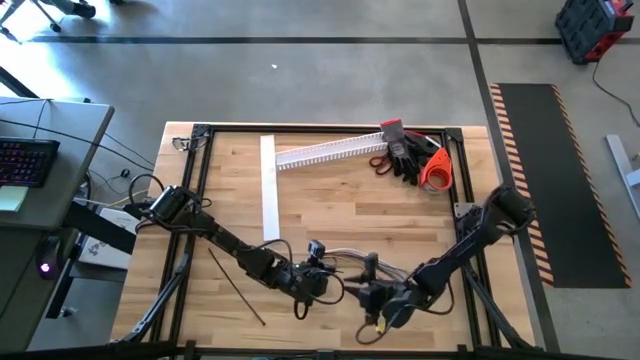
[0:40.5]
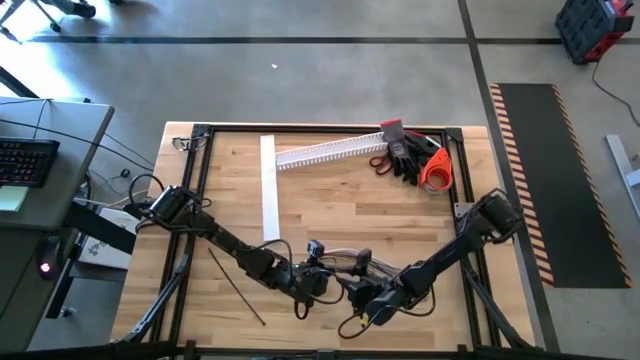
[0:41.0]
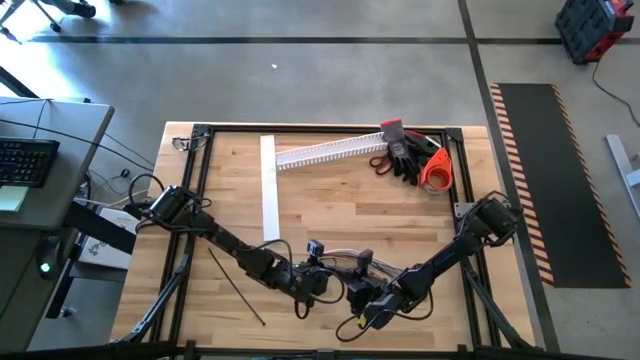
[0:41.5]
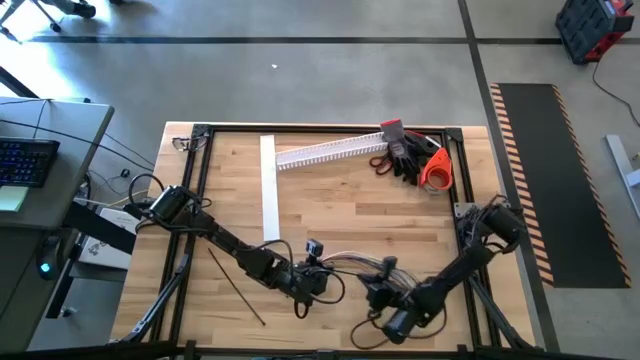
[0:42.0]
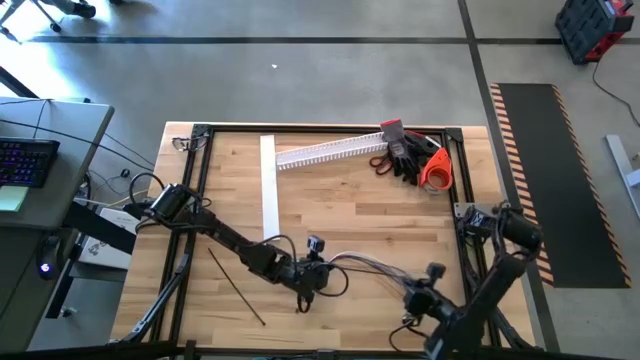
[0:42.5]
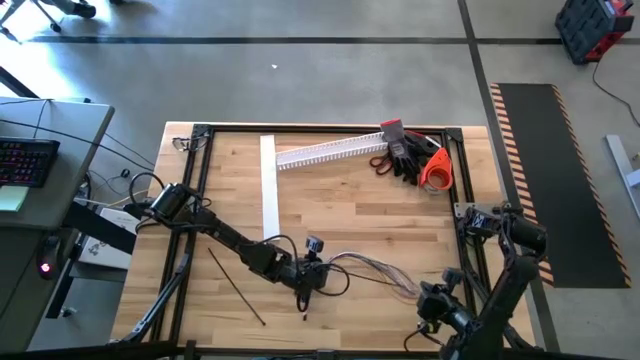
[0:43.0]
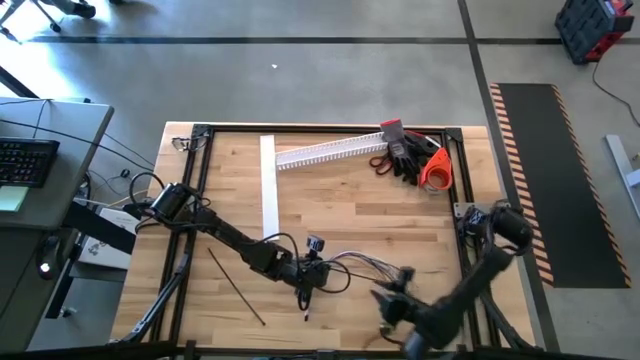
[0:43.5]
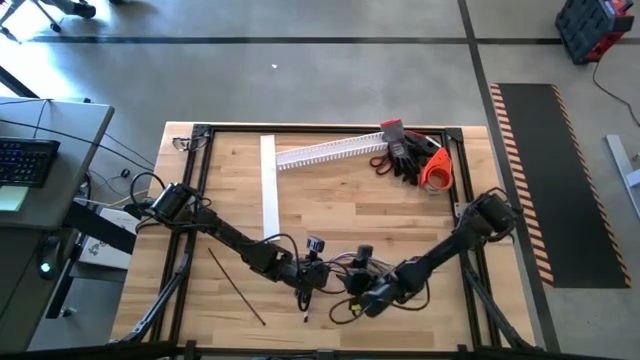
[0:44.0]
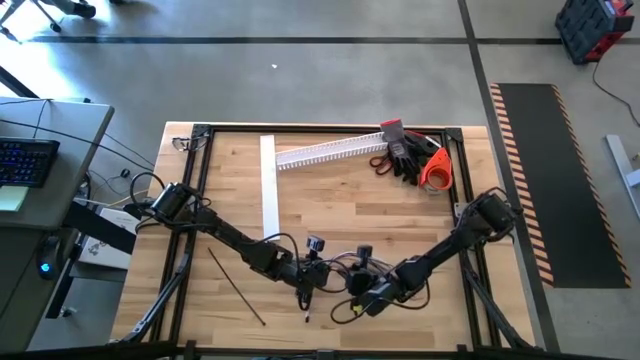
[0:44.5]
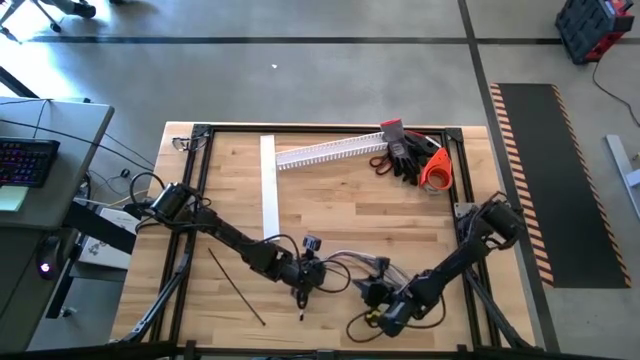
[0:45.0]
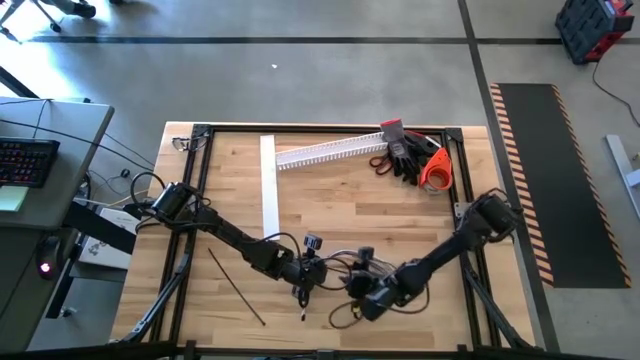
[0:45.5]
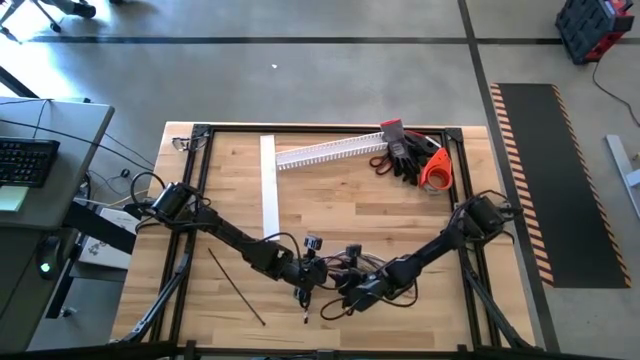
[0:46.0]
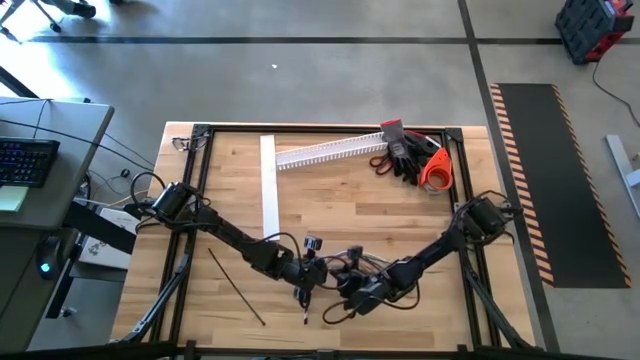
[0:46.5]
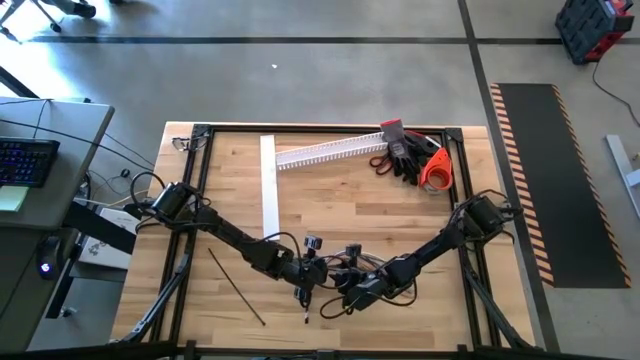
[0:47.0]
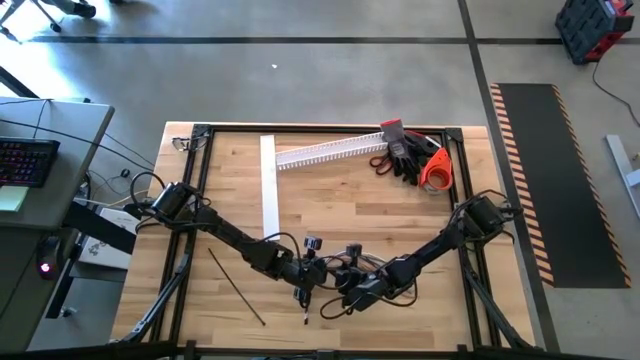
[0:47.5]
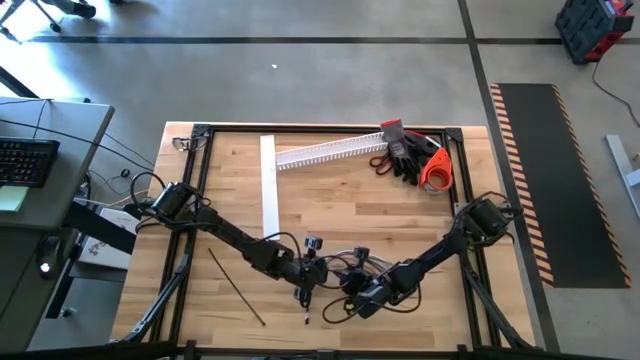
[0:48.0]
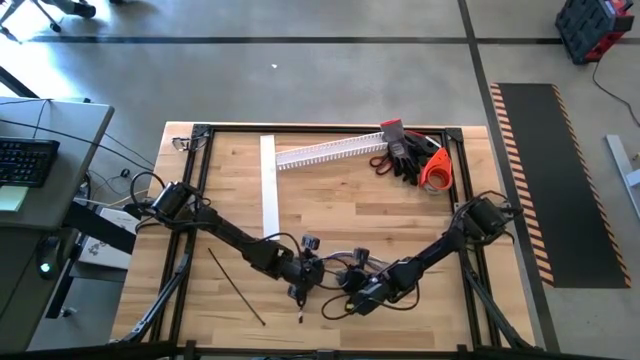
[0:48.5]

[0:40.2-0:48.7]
Task: Ziptie cables
Wrap the cable wires with the black zip tie

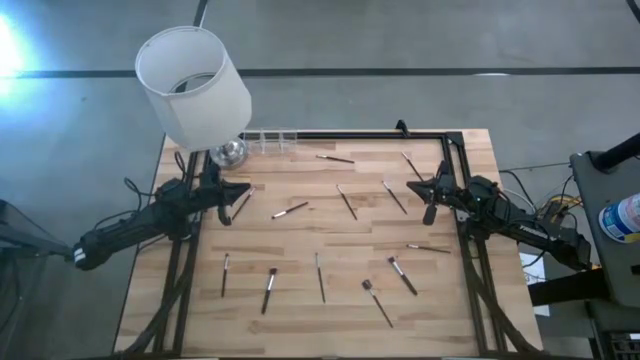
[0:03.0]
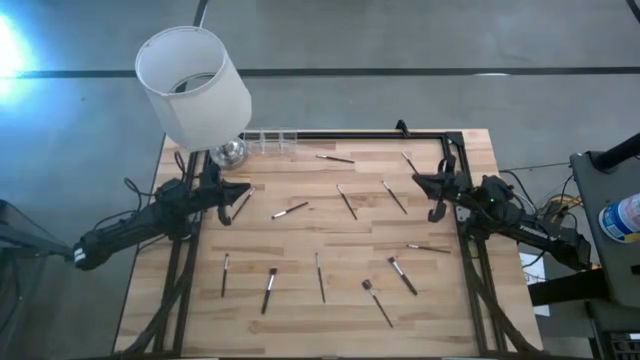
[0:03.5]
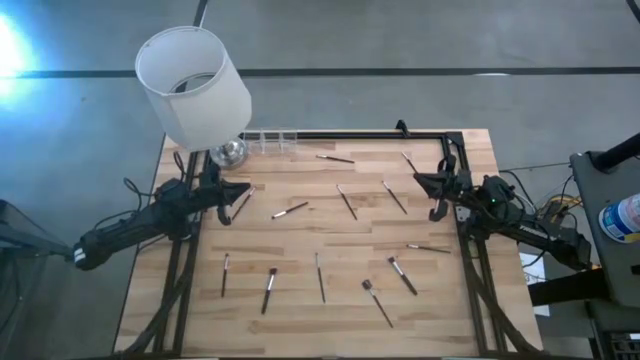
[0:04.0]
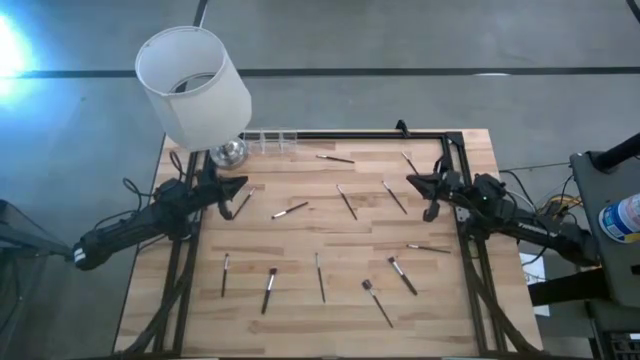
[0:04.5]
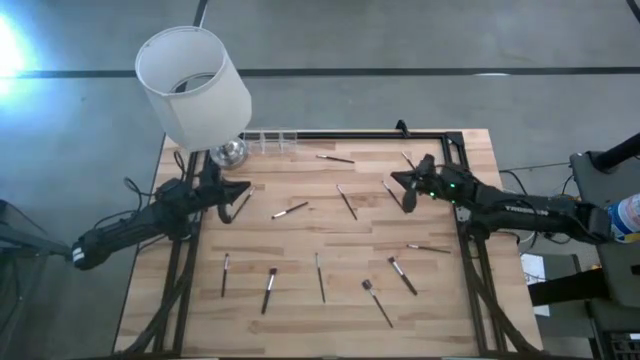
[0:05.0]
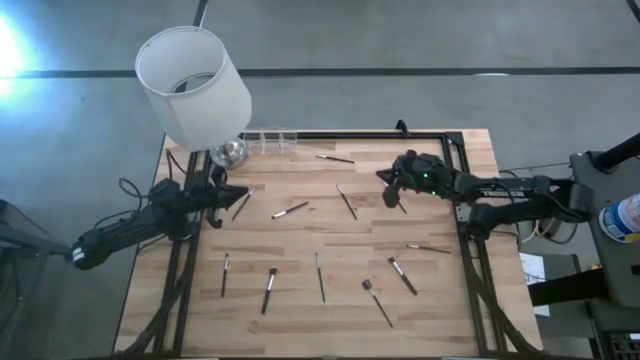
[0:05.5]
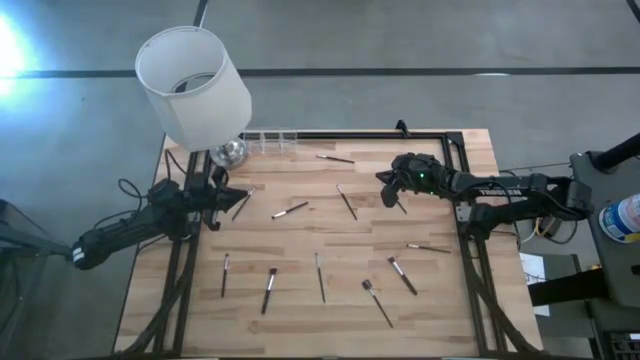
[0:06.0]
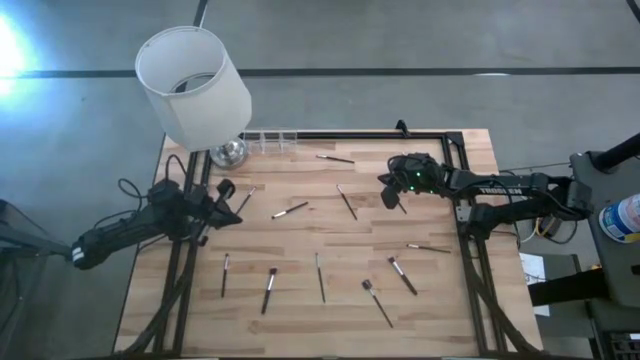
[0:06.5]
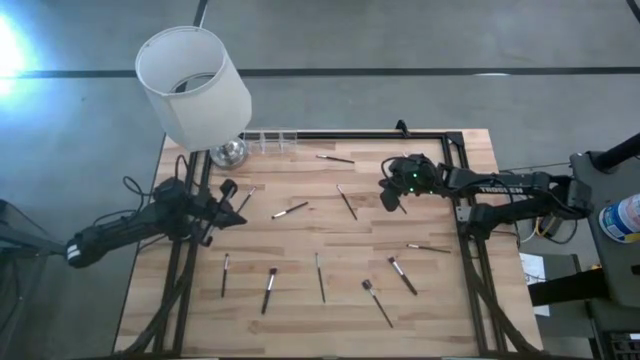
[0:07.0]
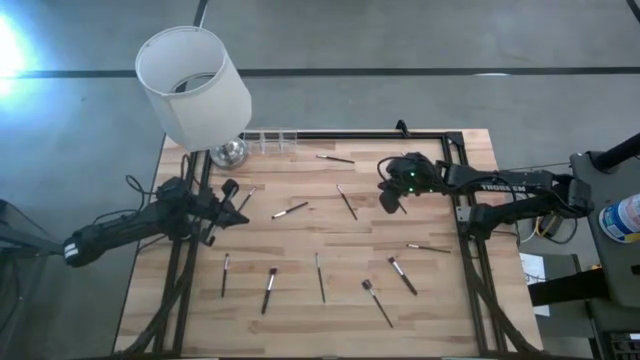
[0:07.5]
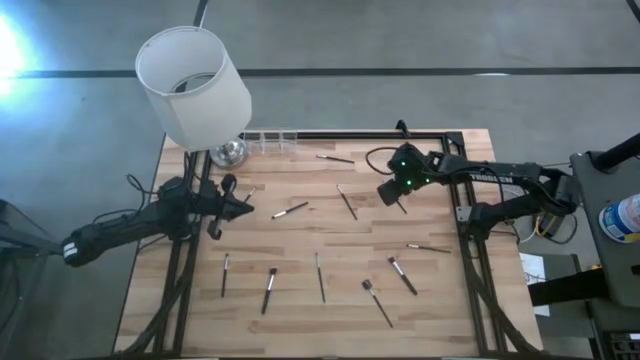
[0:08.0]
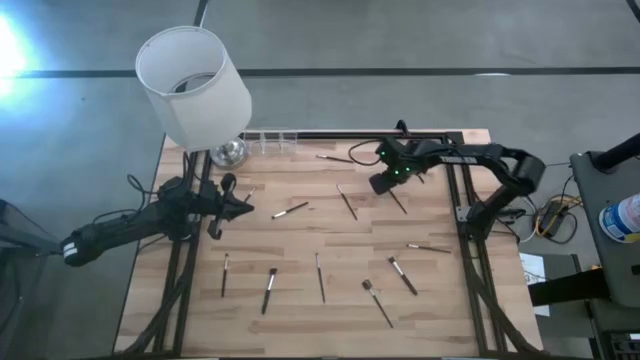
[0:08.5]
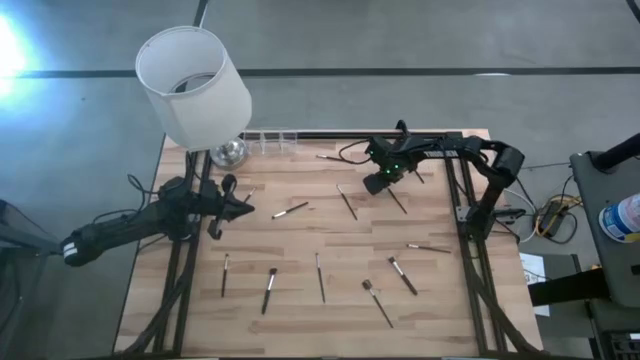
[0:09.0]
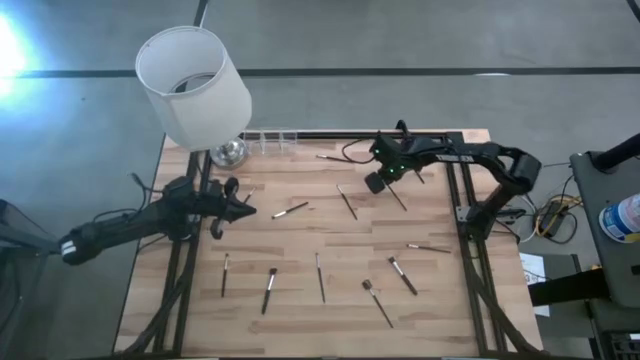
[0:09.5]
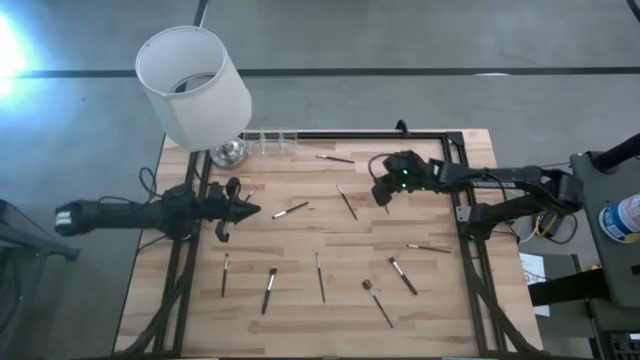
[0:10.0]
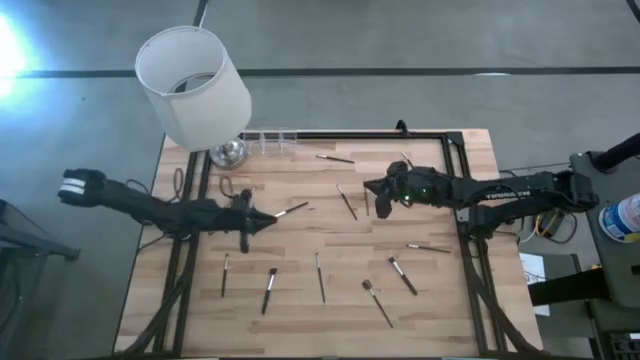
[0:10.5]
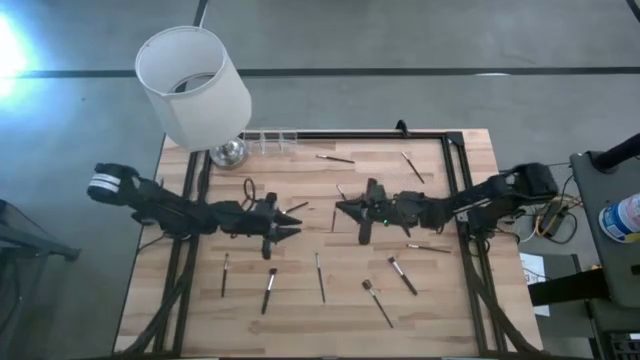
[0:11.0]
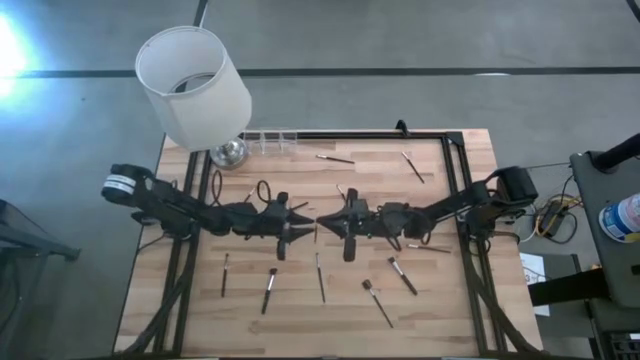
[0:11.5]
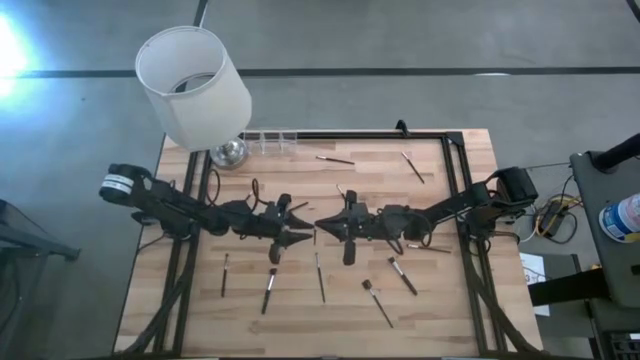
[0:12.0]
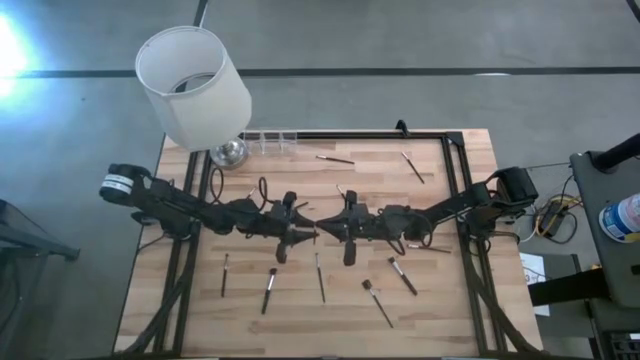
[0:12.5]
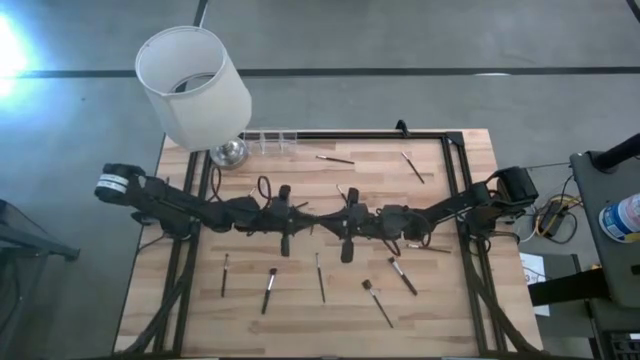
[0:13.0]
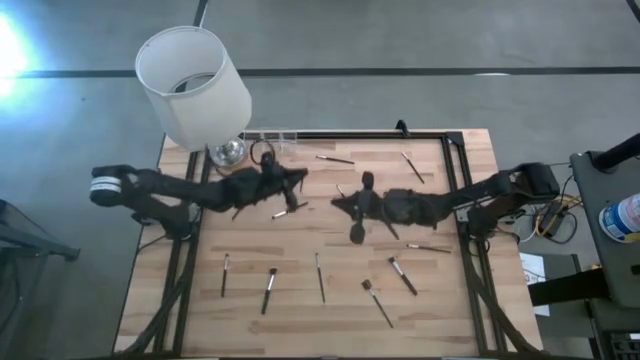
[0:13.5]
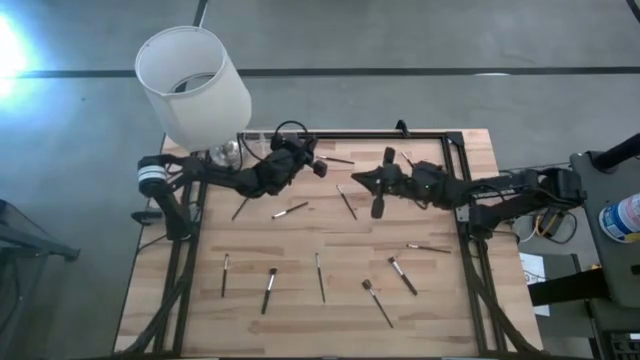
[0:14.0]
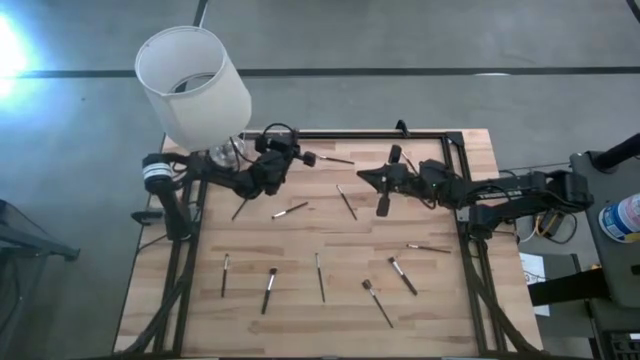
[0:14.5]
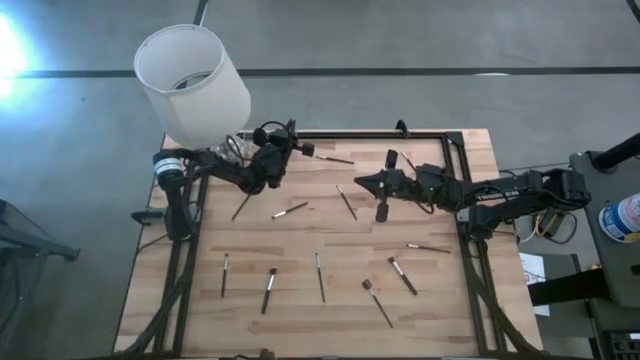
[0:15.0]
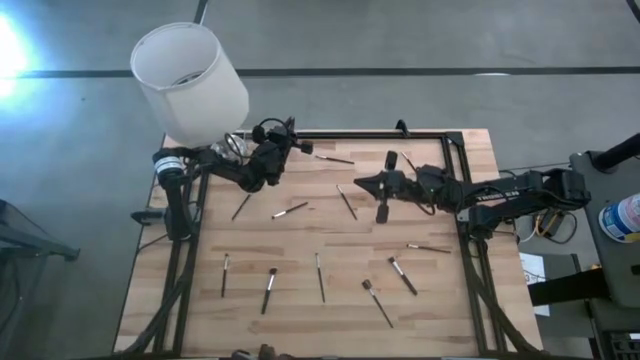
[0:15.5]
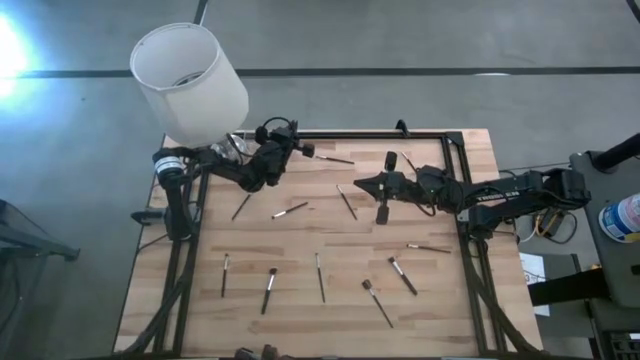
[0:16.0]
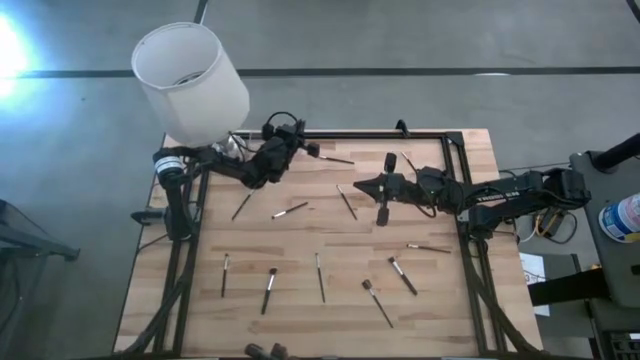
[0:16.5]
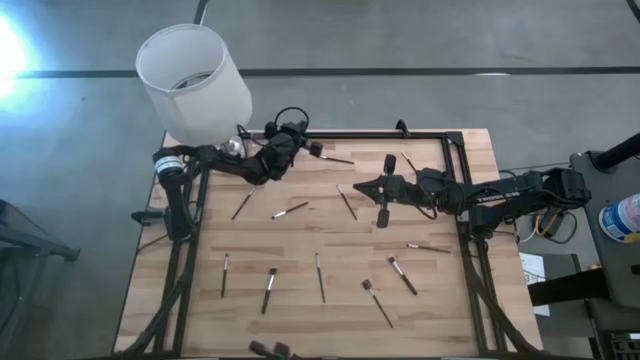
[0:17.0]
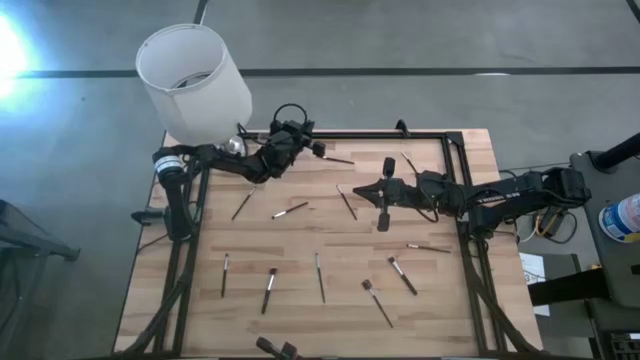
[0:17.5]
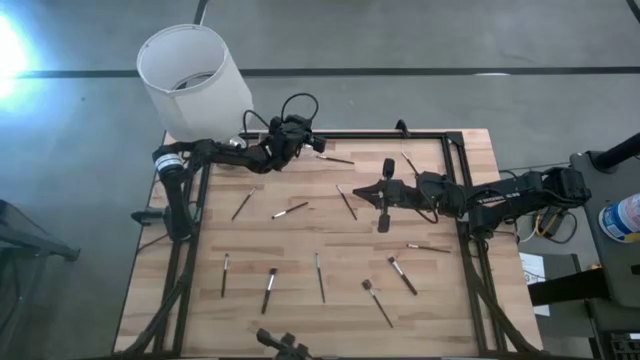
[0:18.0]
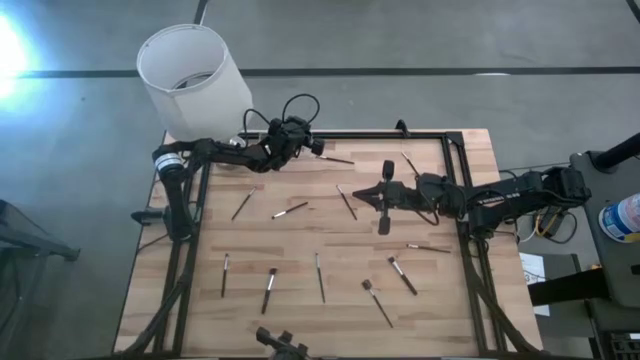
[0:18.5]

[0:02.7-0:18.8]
Task: Put items in baskets/containers
Put the eyeshadow brush into the transparent organizer
